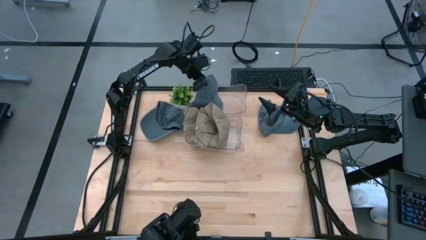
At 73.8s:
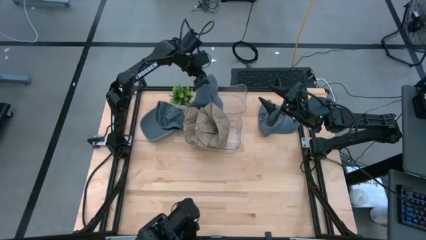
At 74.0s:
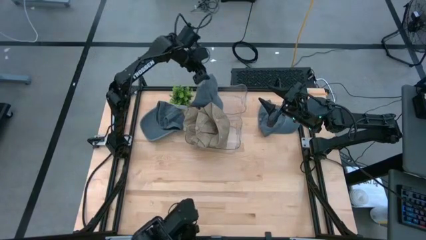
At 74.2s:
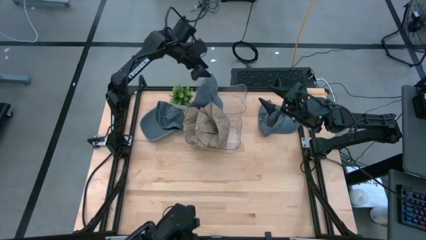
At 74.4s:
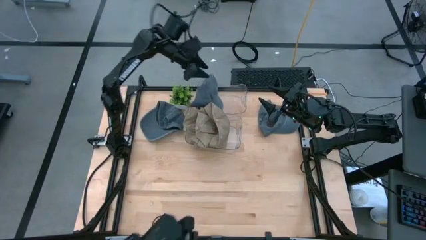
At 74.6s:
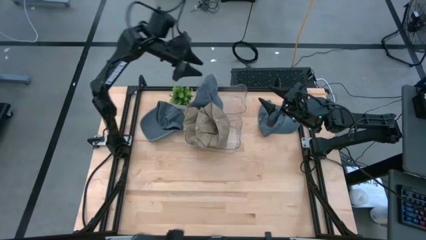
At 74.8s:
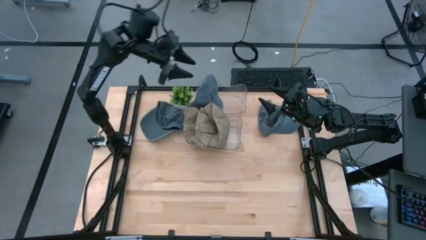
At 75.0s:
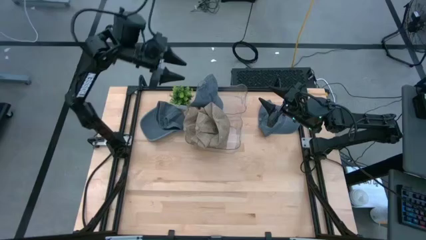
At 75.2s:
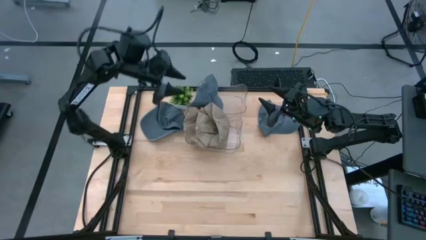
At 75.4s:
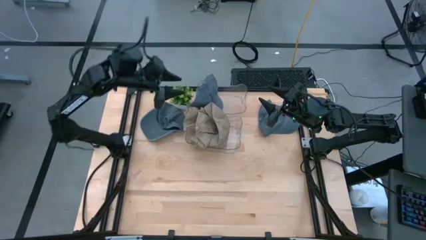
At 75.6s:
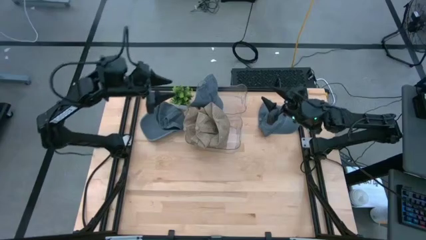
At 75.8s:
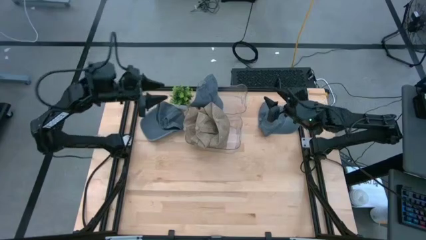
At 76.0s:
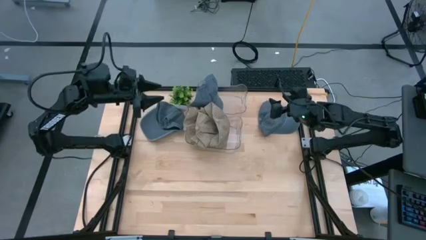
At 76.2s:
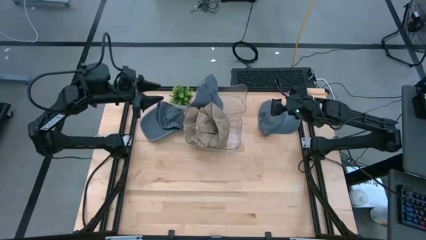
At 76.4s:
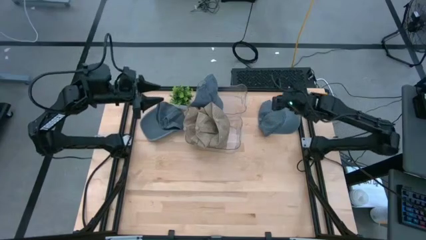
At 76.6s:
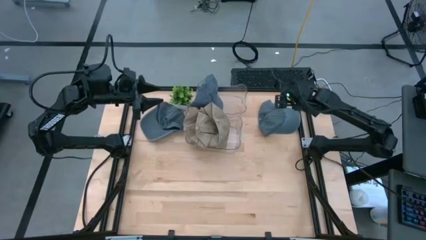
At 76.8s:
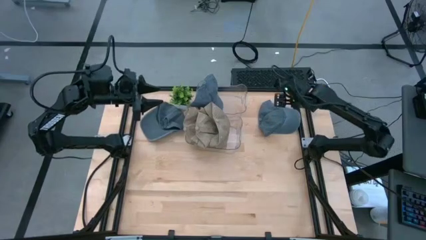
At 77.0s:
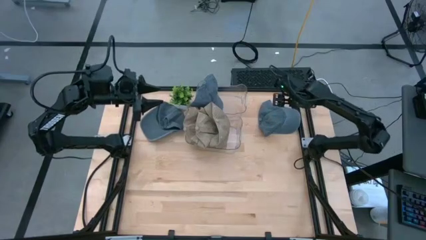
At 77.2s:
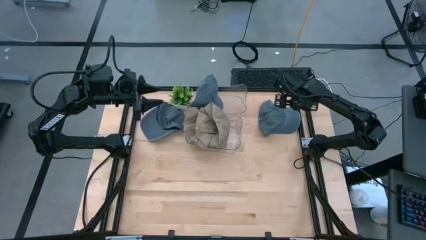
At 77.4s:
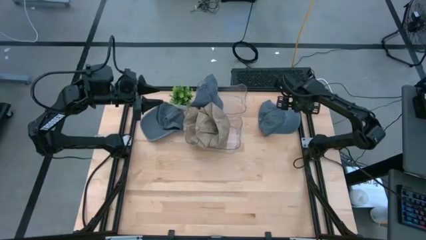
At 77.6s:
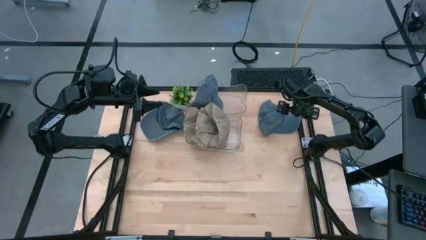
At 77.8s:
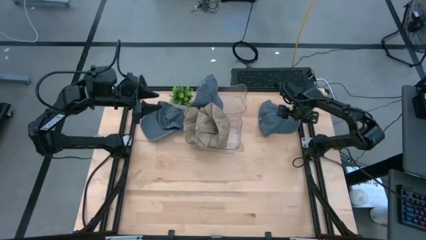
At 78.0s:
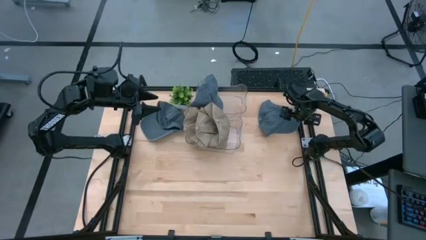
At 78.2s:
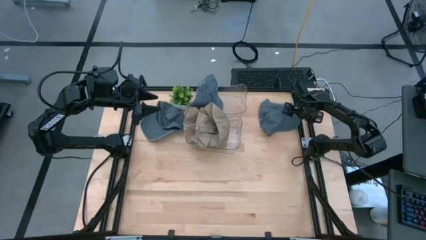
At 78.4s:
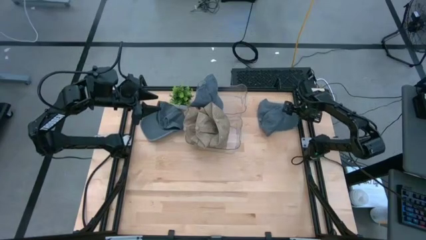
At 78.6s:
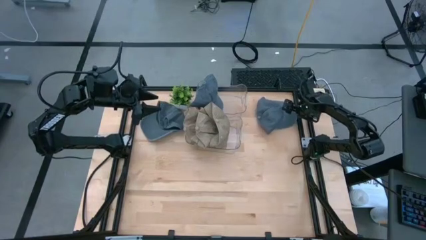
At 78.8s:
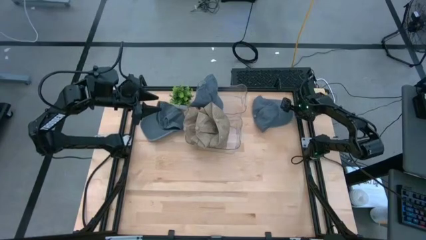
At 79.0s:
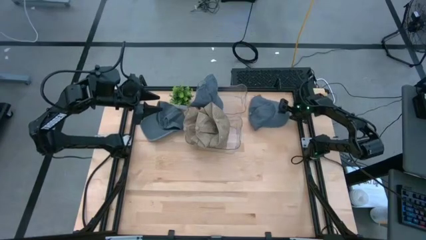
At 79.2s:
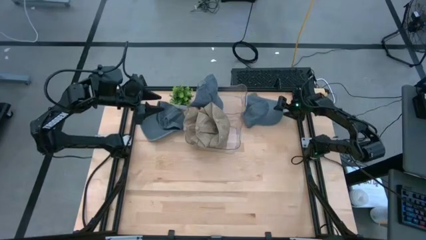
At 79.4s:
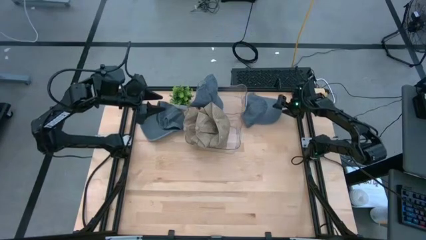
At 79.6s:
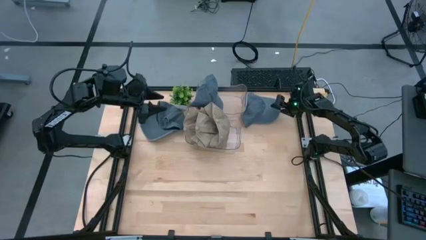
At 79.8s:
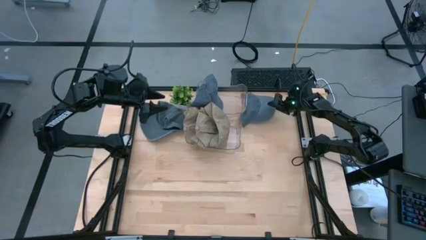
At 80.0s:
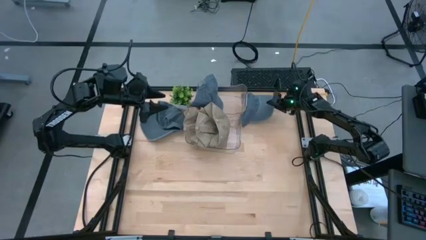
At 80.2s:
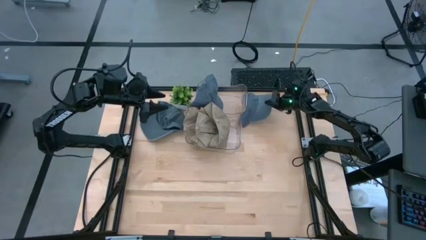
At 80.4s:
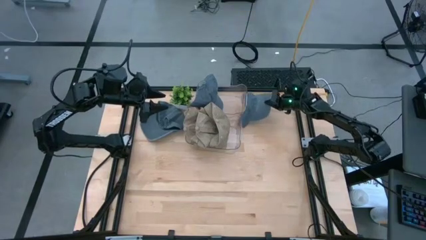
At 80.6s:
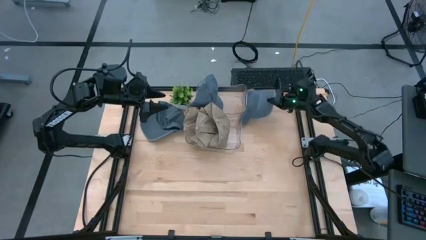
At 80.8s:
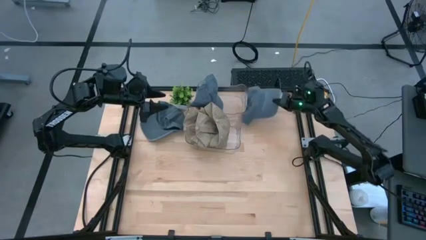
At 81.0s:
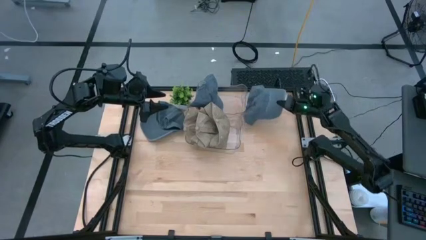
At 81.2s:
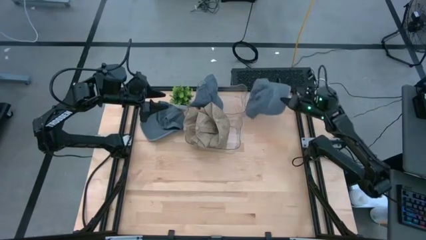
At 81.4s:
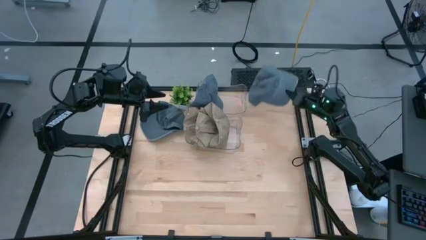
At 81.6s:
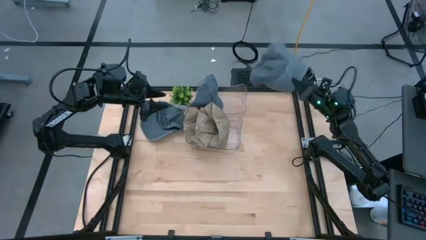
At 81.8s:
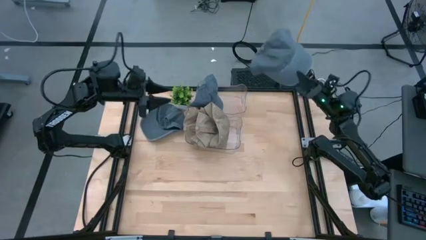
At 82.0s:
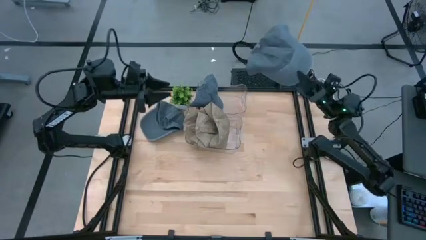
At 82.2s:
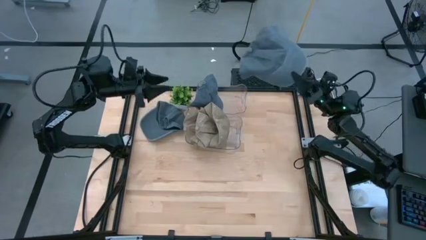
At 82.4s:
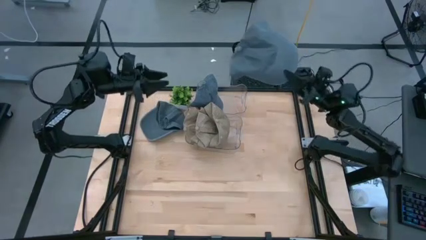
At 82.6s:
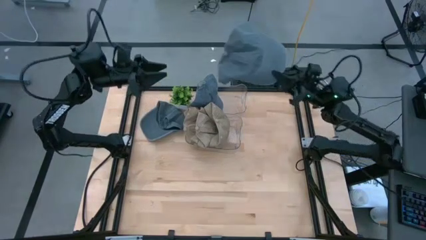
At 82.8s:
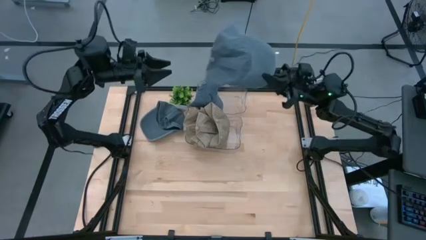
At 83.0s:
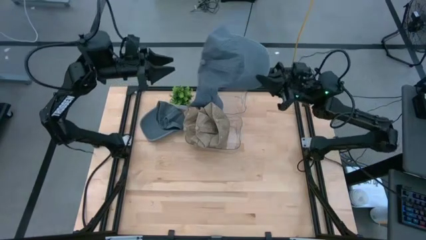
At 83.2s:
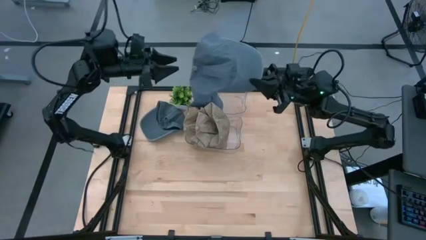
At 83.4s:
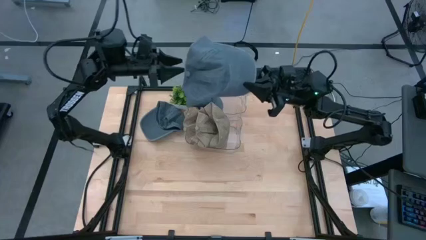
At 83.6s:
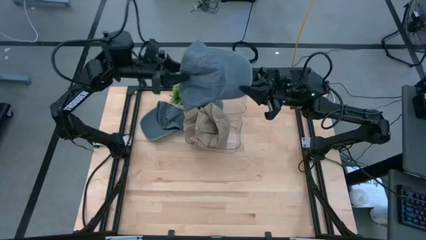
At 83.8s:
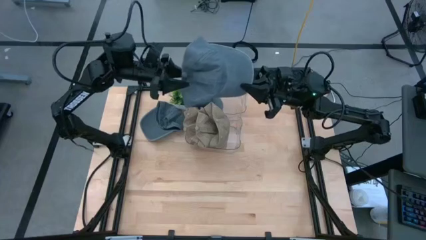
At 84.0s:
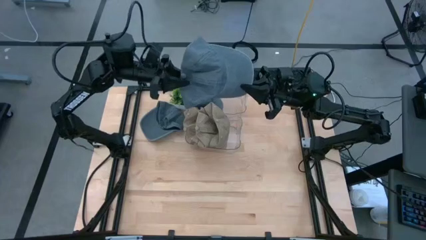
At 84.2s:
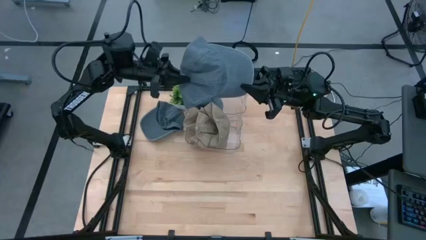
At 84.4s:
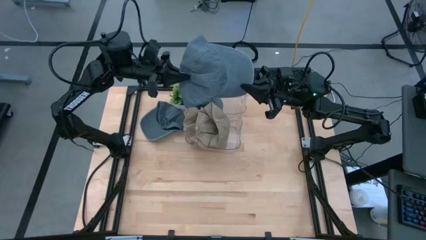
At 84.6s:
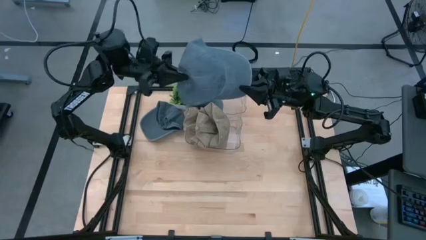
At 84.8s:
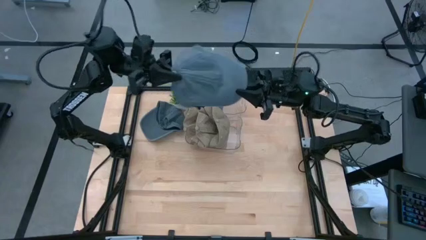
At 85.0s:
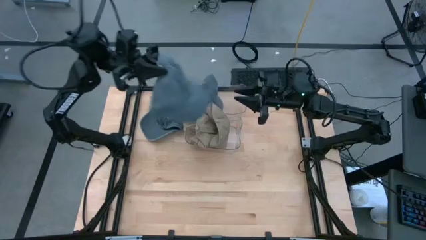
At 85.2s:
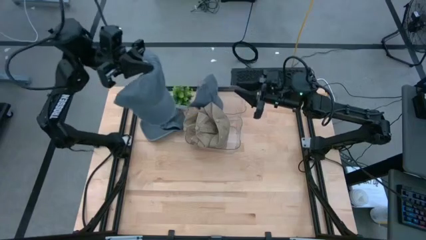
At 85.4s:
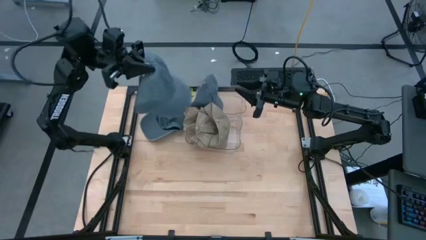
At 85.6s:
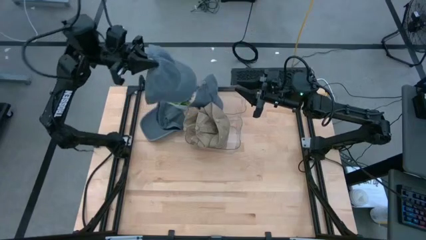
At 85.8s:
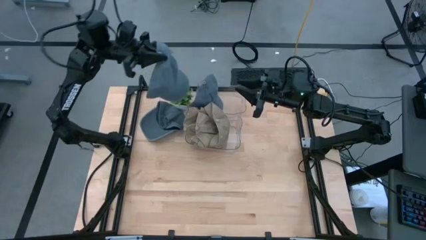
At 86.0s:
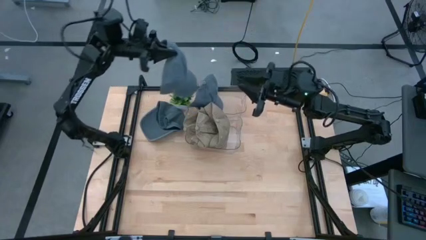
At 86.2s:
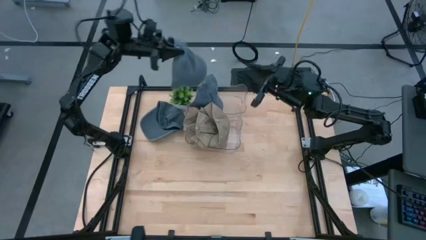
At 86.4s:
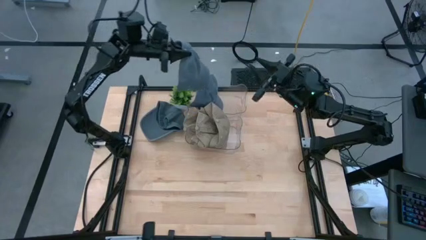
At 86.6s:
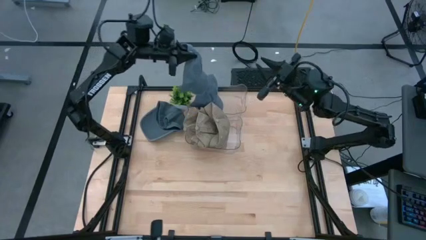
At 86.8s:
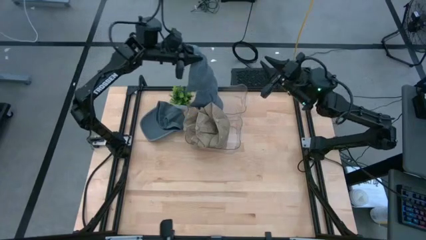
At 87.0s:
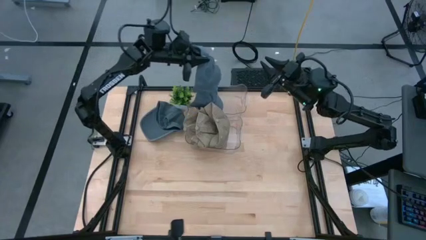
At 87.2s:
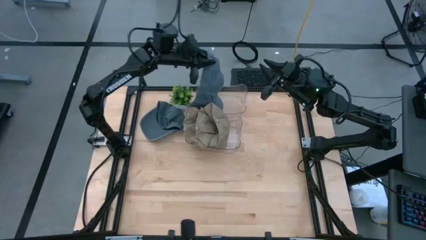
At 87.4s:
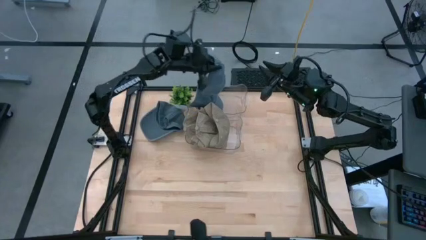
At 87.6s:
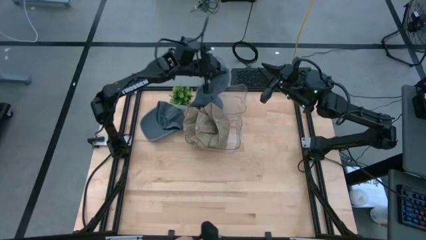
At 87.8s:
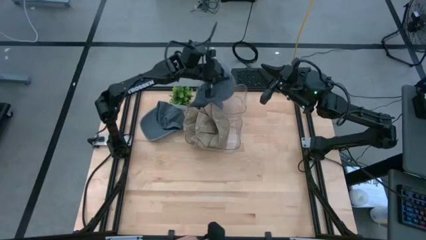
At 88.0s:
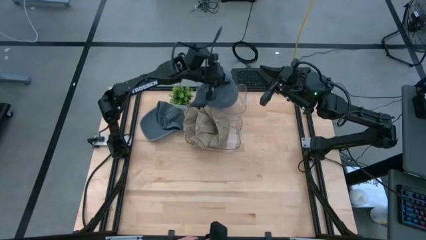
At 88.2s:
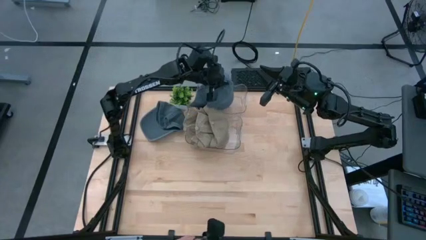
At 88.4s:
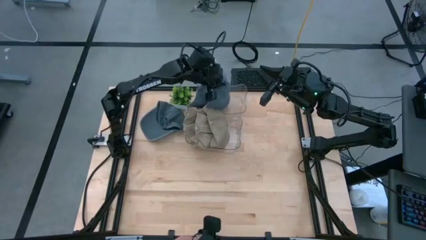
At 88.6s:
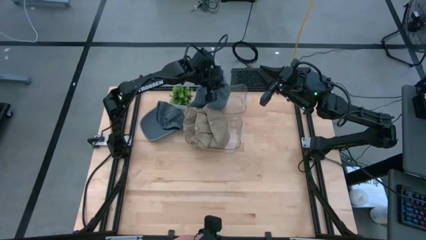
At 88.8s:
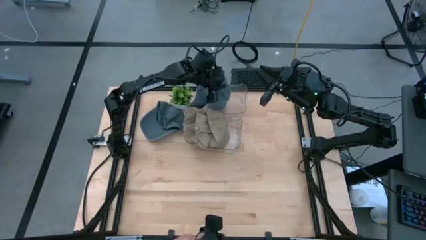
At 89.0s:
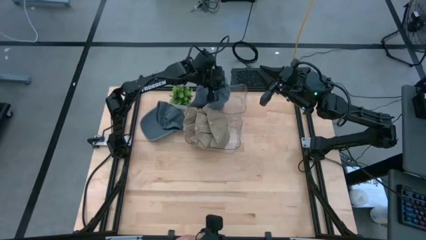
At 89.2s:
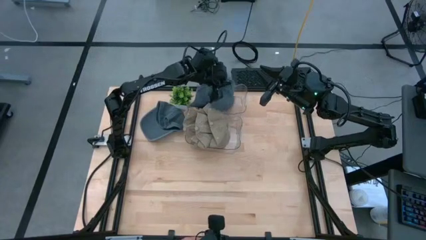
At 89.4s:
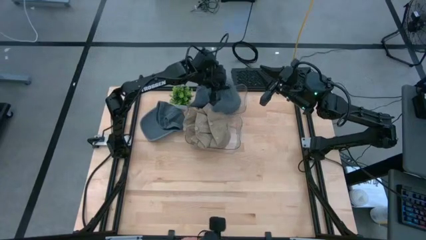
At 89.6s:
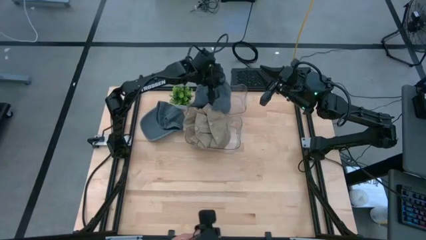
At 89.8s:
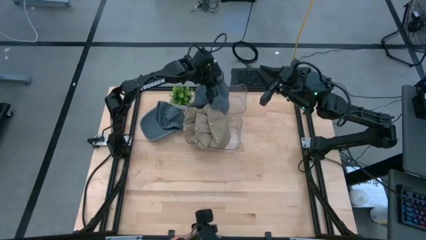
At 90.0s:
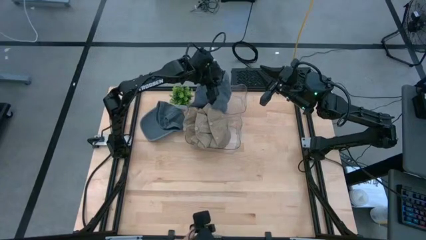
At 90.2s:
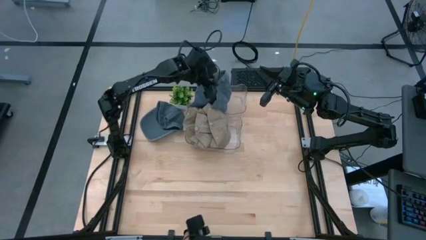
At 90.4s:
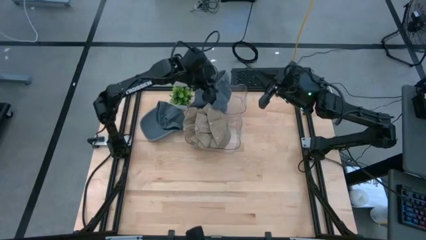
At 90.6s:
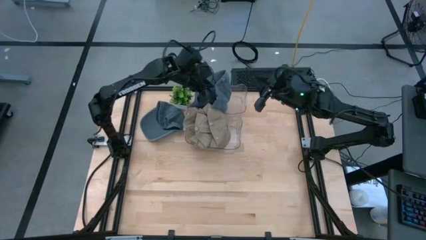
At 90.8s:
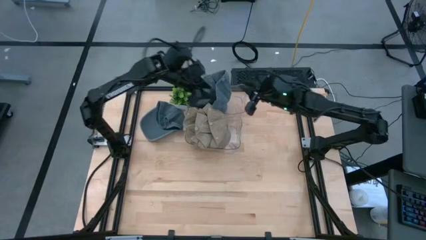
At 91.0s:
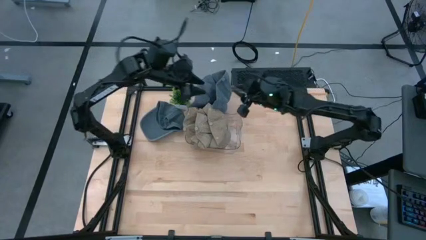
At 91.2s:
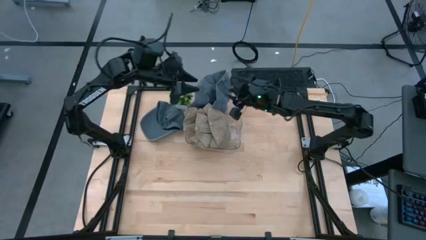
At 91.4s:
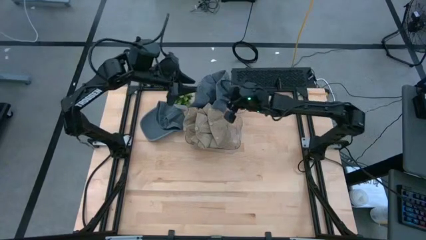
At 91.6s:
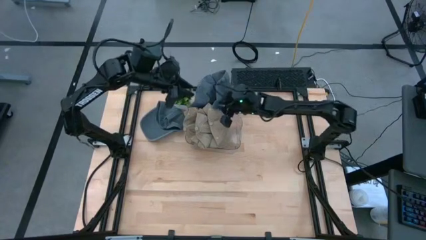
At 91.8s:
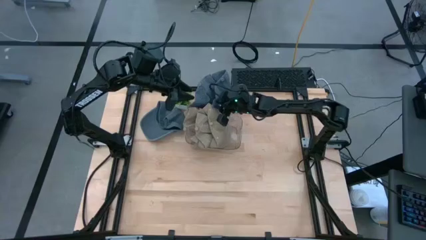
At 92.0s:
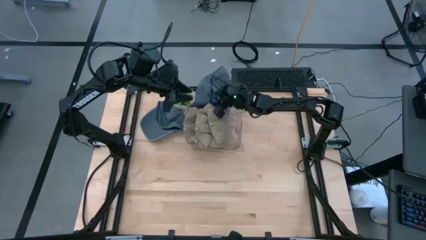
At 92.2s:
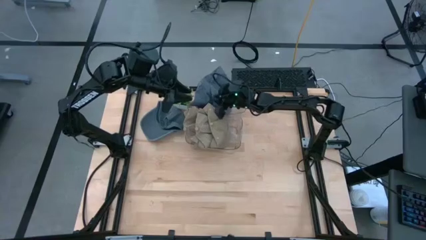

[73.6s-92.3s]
Task: Pick & Place hat
Put the right gray cap into the top transparent bin
